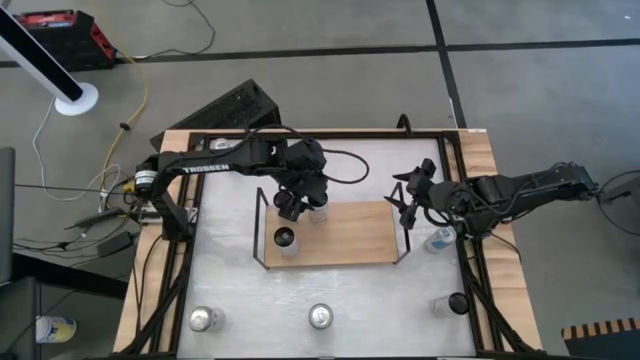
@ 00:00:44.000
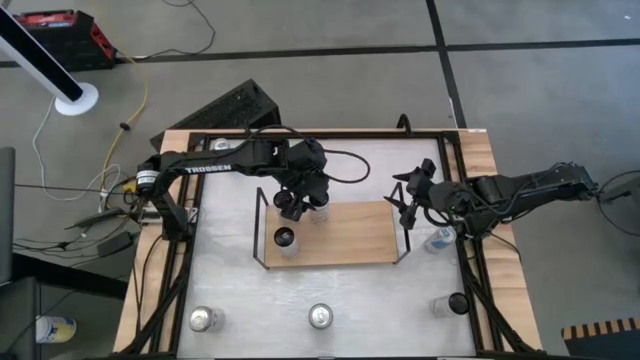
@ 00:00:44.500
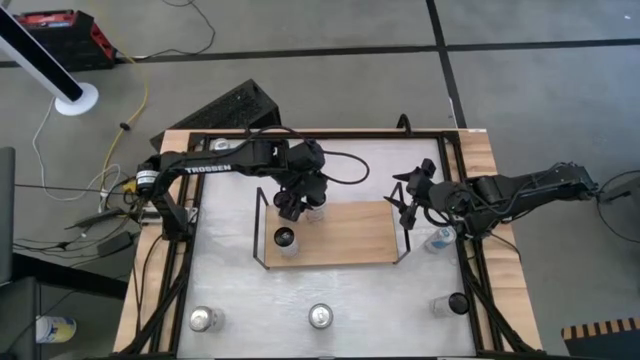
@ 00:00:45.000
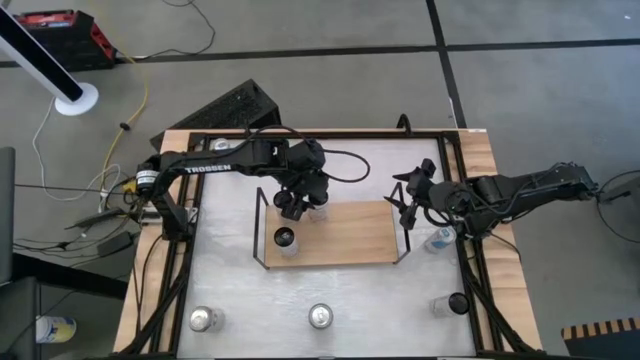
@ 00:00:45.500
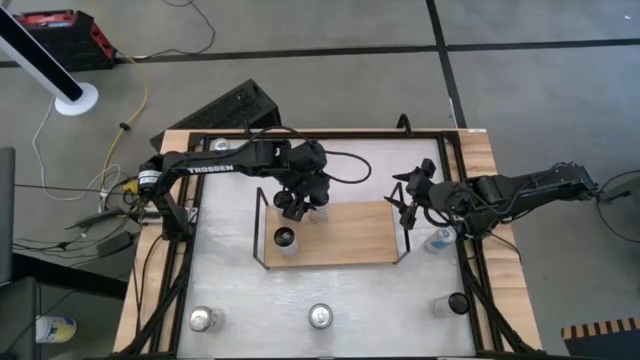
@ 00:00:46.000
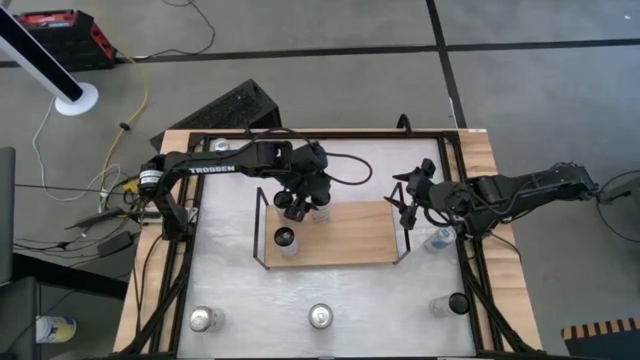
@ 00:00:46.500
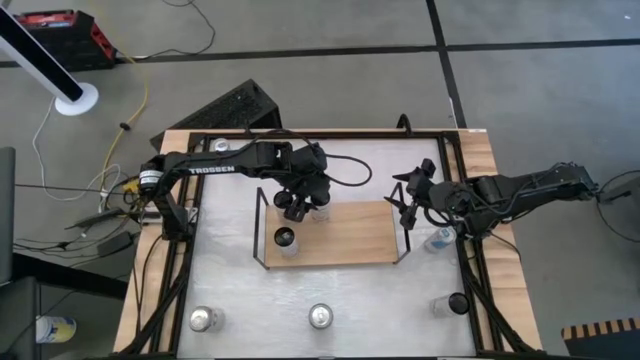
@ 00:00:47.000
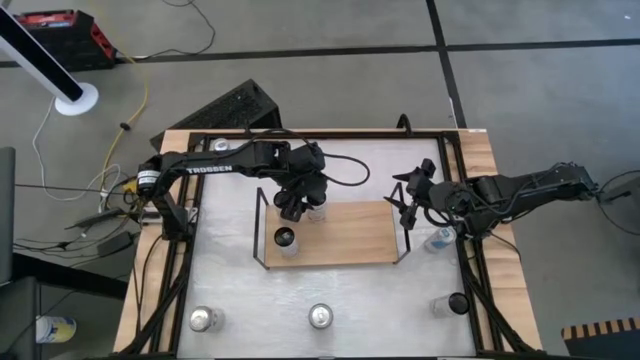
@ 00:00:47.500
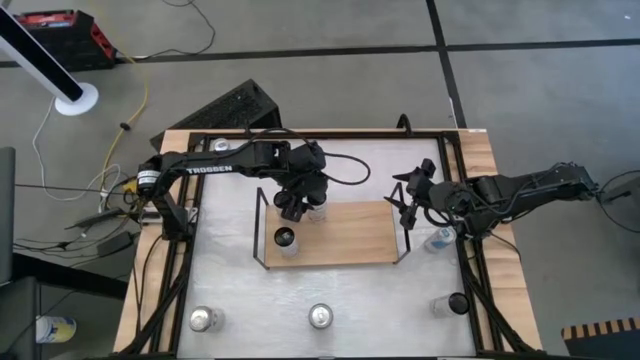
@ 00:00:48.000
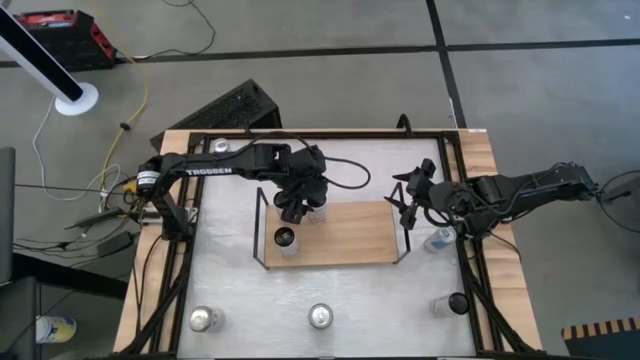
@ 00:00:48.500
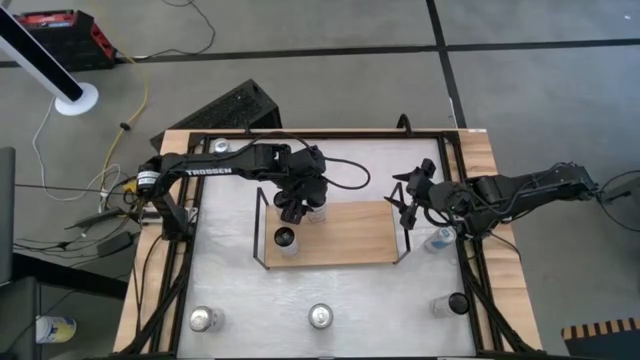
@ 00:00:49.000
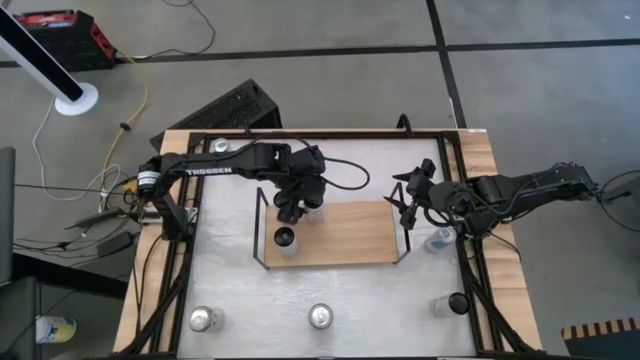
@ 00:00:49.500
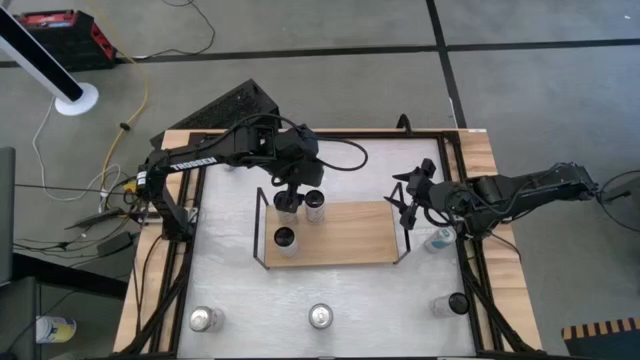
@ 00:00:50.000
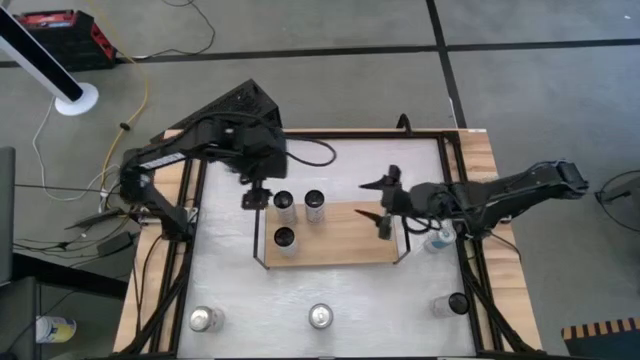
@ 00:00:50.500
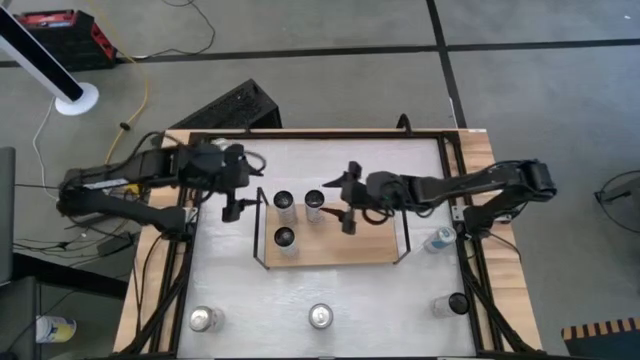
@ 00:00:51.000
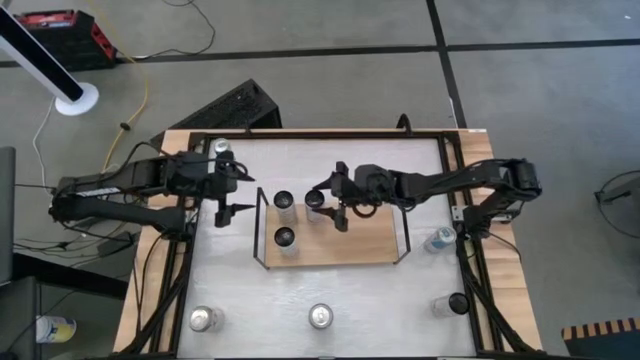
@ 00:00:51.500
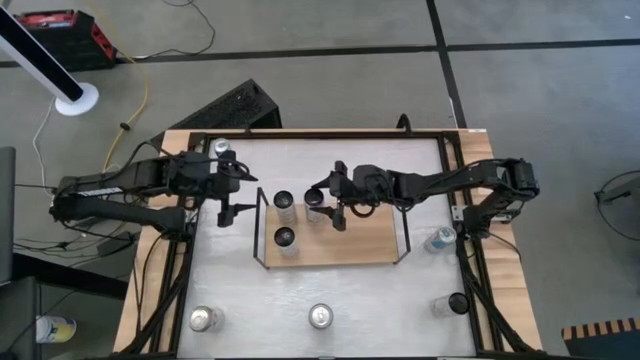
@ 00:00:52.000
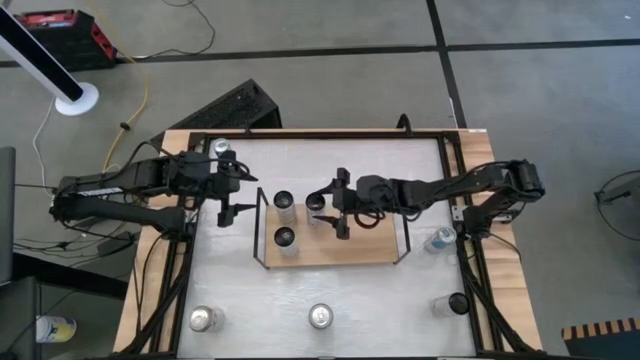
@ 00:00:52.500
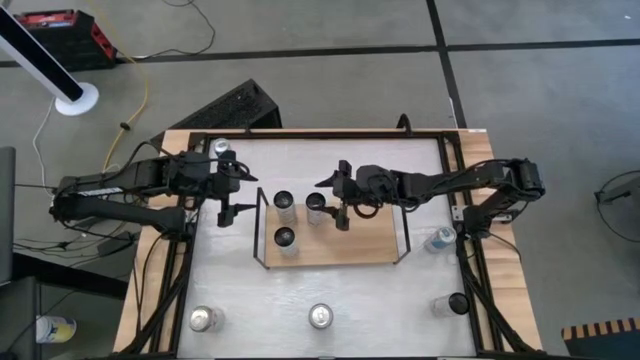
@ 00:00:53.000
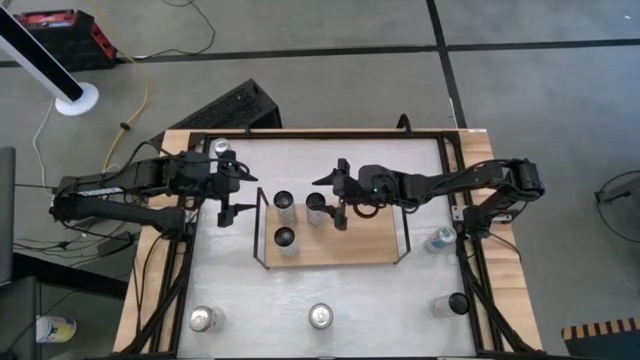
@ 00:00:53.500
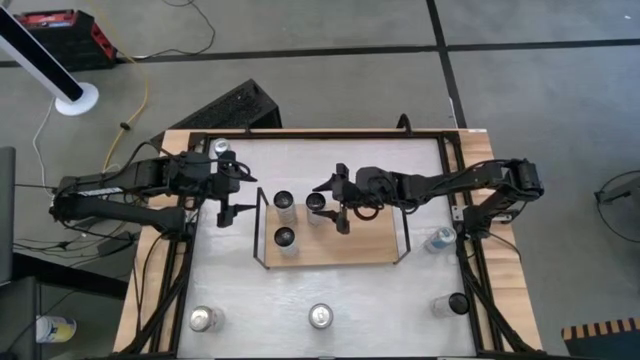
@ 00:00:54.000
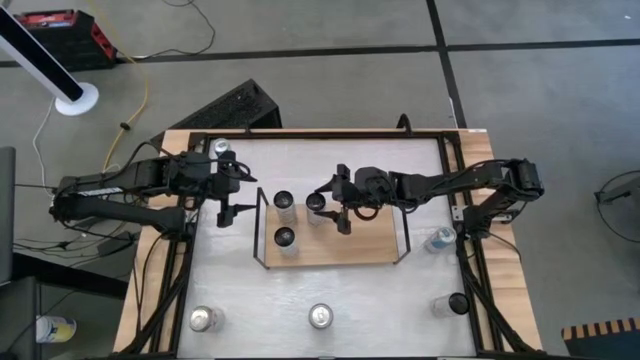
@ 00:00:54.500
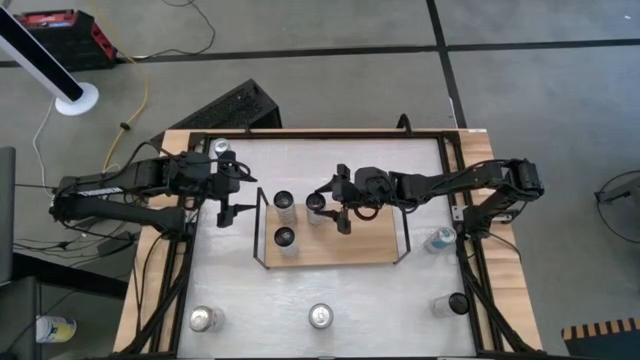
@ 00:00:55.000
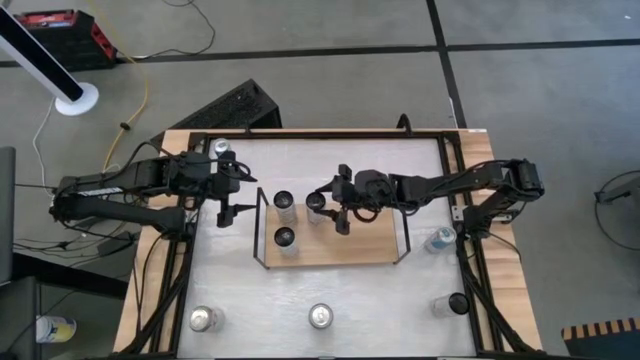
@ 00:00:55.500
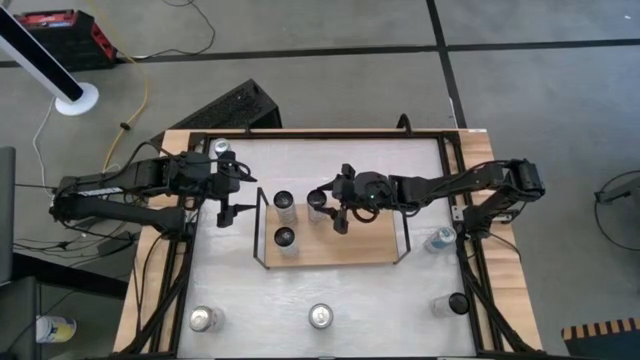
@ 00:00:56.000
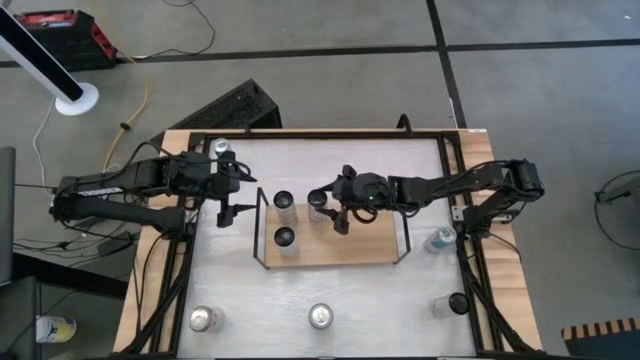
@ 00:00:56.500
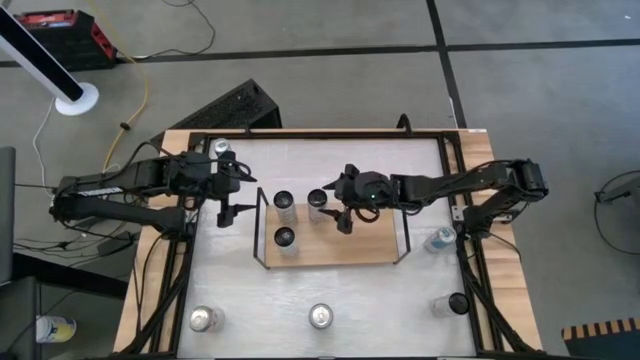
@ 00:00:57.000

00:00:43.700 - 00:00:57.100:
Task: Place canned beverage on shelf
Put the left white-pink soda can on the shelf

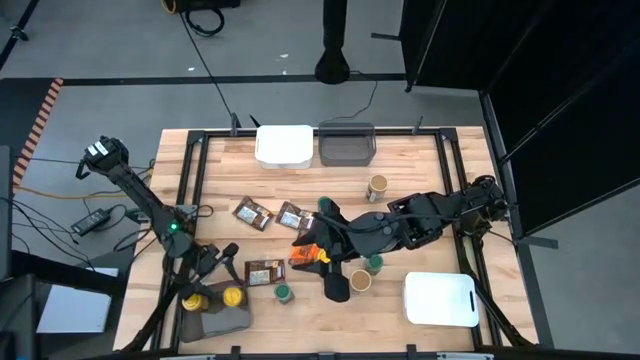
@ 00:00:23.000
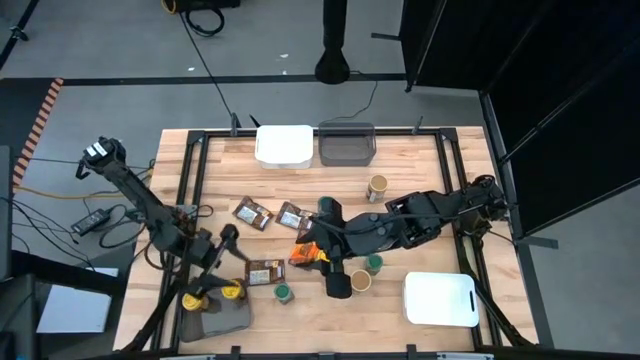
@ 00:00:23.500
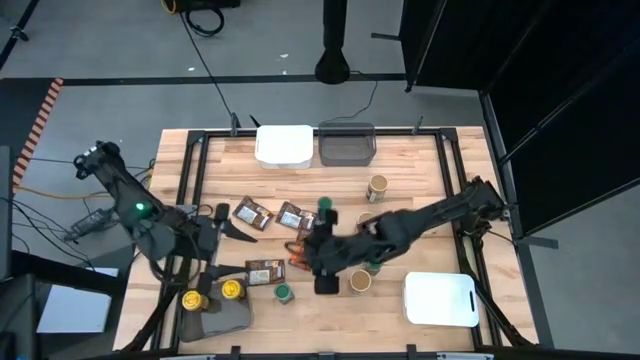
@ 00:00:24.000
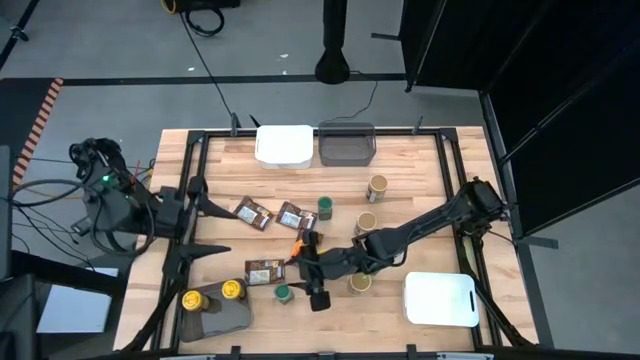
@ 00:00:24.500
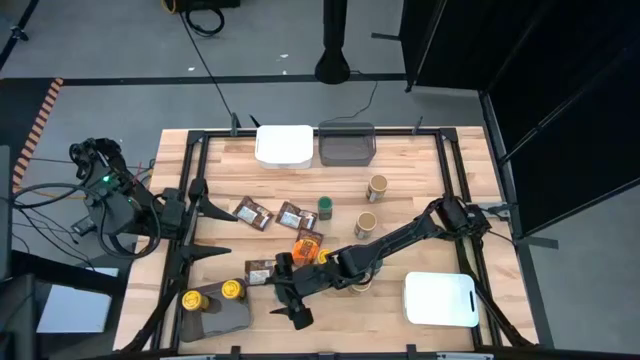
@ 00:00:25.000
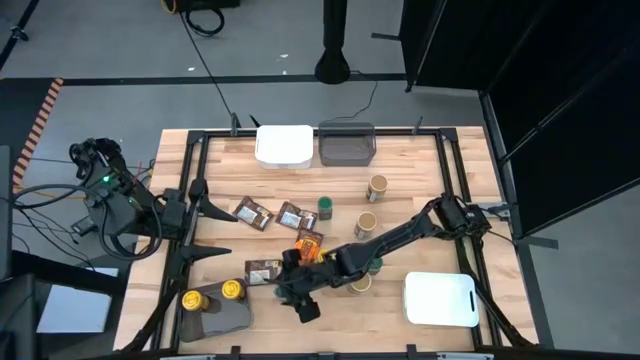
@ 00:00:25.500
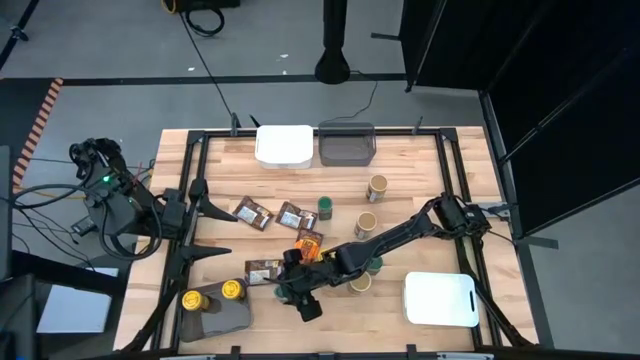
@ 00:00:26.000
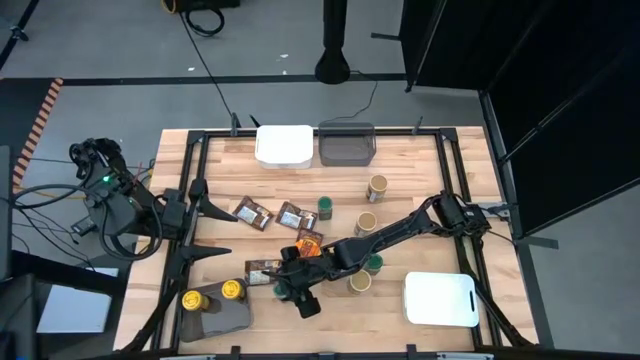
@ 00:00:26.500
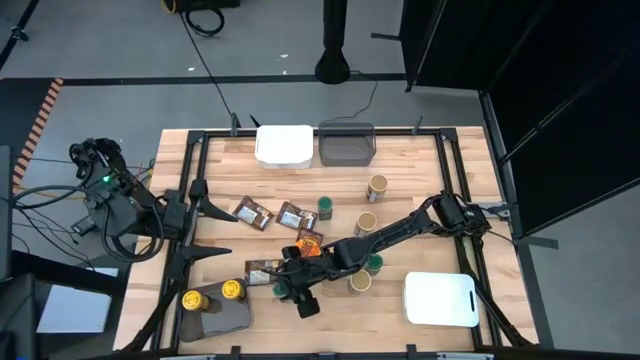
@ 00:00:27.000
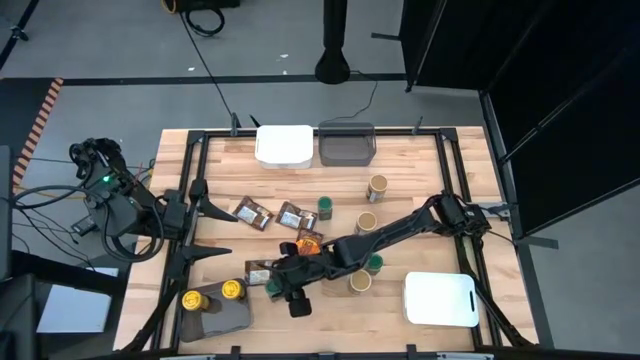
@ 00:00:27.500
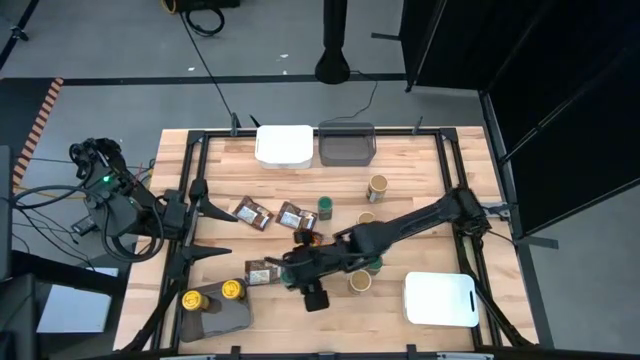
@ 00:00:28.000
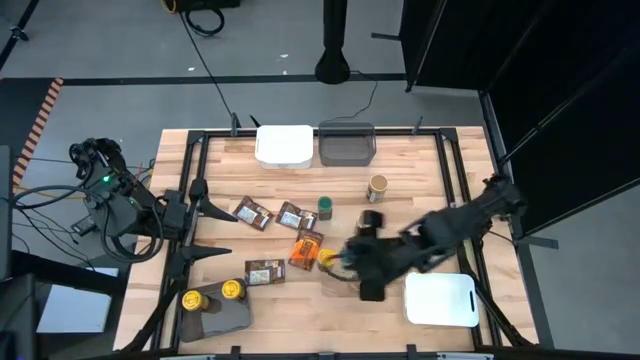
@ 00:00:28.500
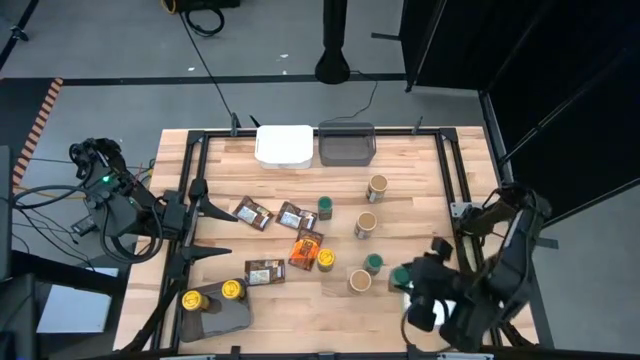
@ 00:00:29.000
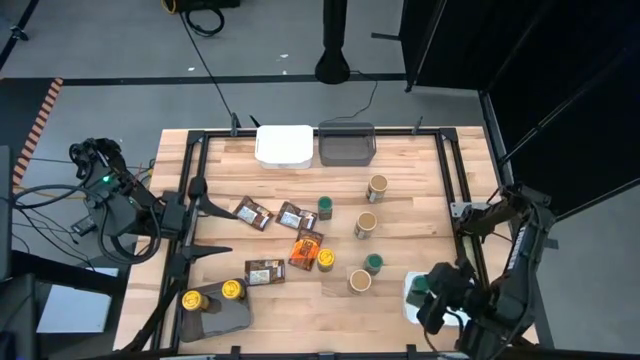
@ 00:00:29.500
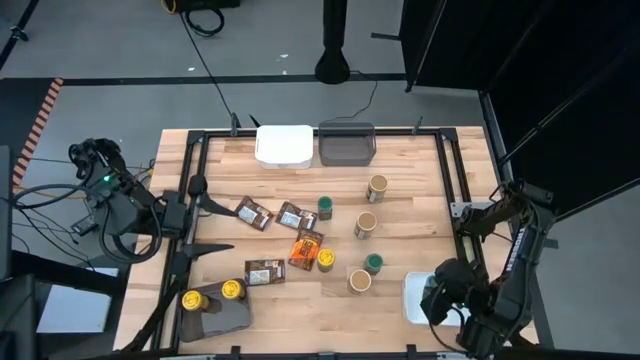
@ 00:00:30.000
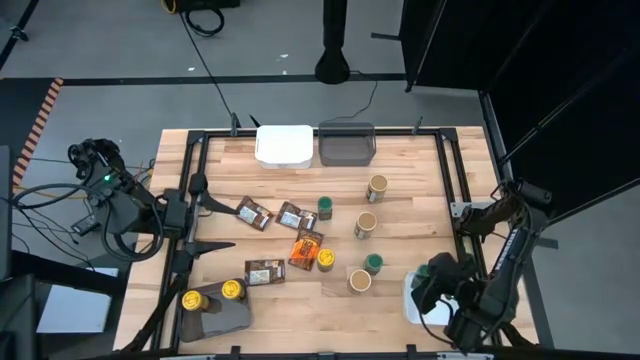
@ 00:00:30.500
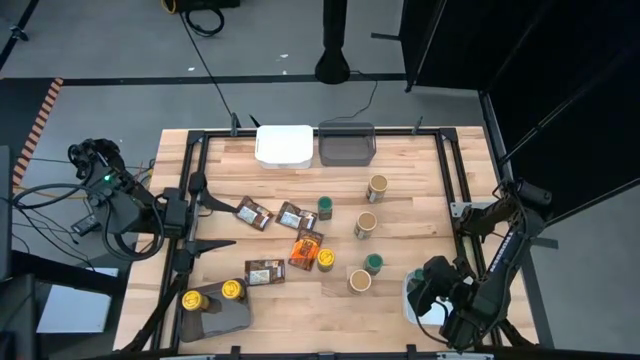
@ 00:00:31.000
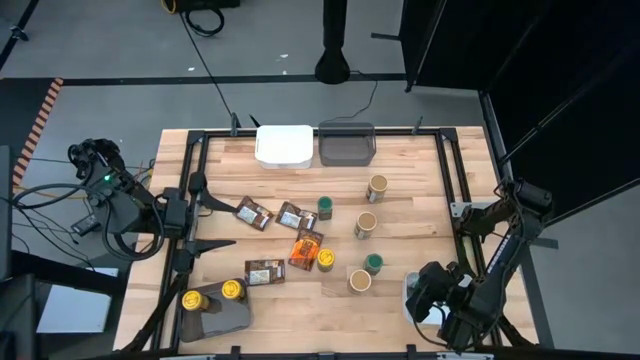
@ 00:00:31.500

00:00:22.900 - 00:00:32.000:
Task: Sort spices by type
Put the green seasoning bottle into the bottom white bin
